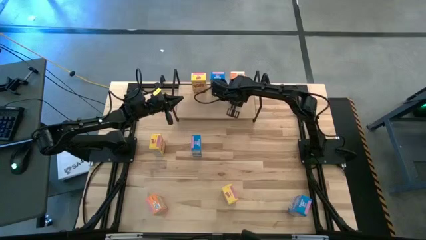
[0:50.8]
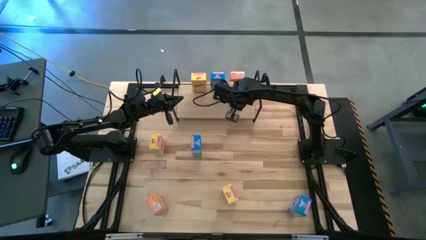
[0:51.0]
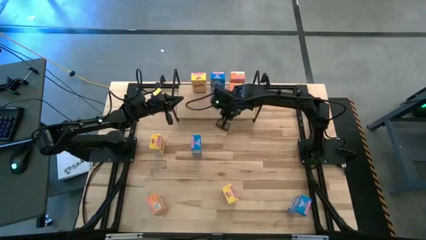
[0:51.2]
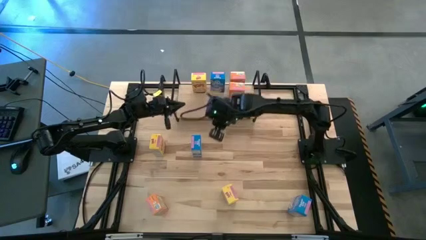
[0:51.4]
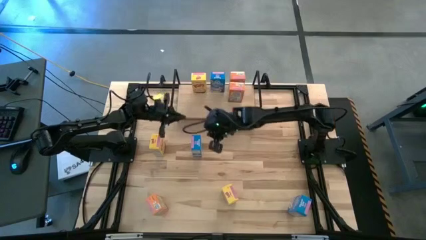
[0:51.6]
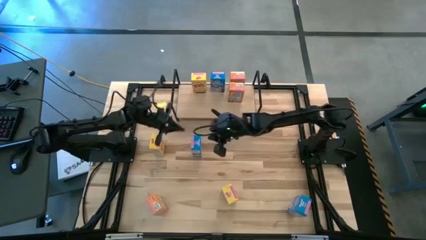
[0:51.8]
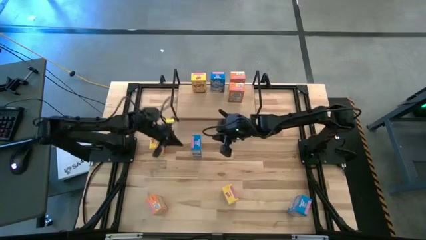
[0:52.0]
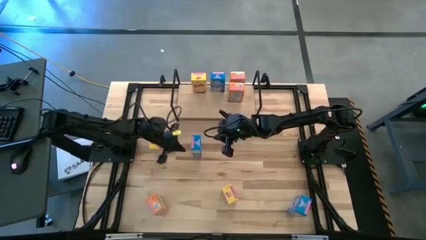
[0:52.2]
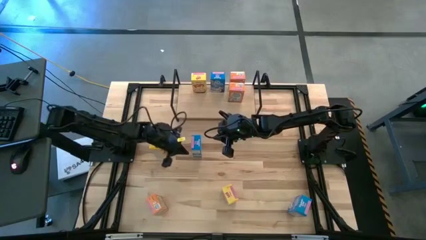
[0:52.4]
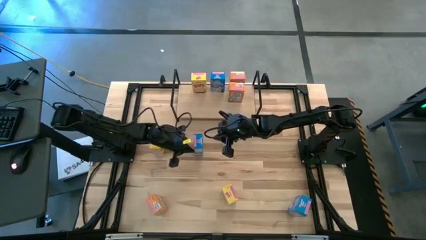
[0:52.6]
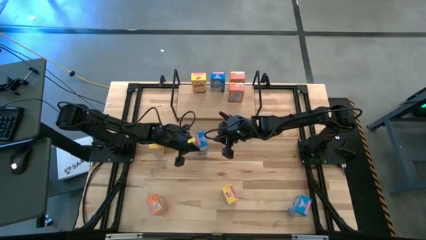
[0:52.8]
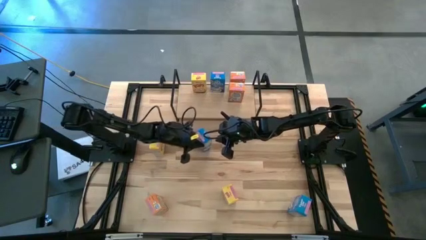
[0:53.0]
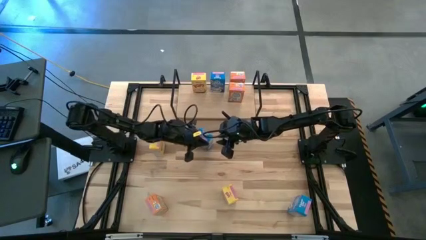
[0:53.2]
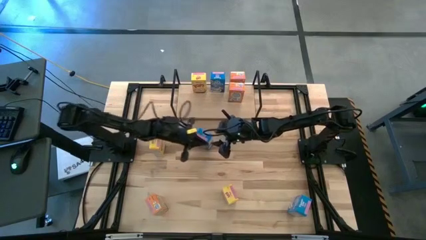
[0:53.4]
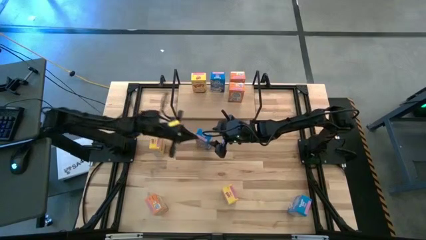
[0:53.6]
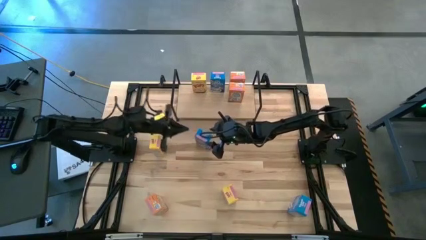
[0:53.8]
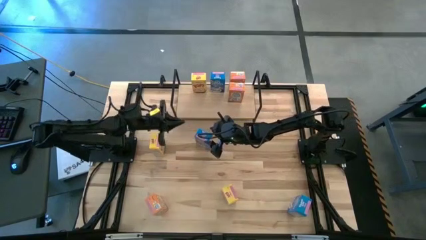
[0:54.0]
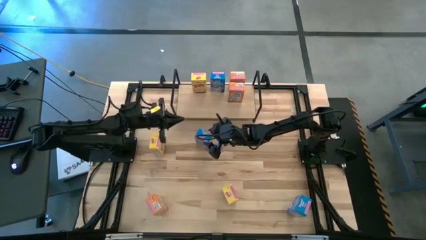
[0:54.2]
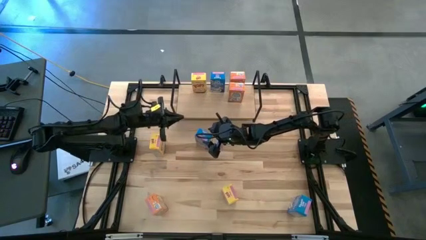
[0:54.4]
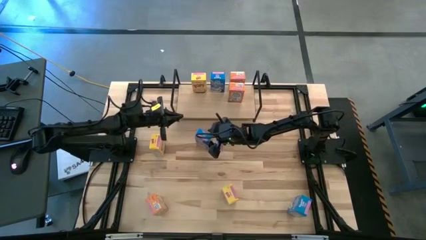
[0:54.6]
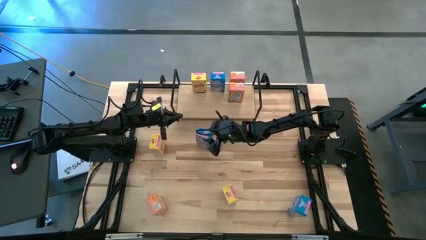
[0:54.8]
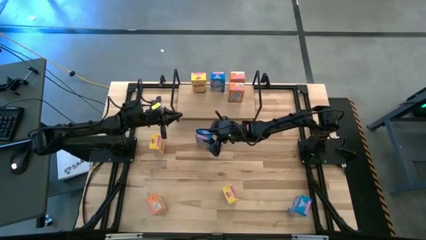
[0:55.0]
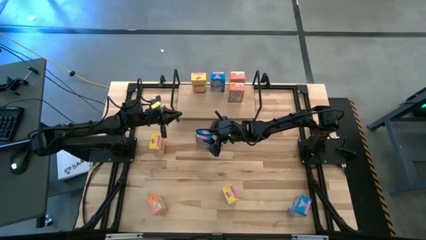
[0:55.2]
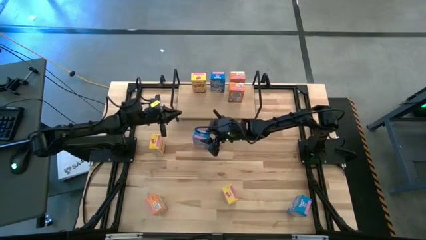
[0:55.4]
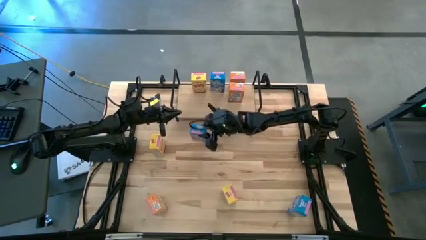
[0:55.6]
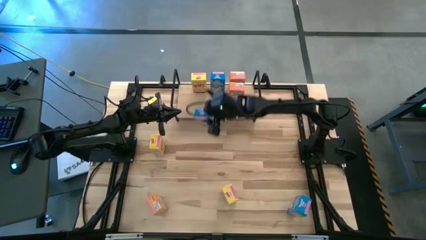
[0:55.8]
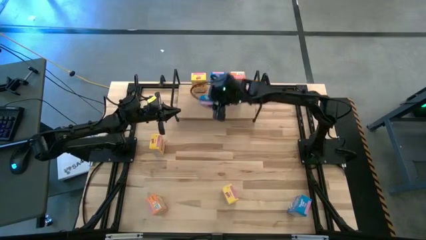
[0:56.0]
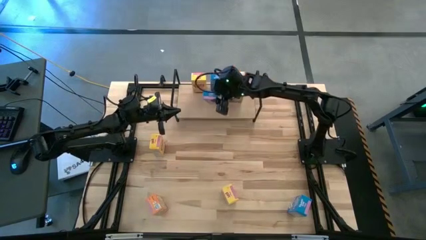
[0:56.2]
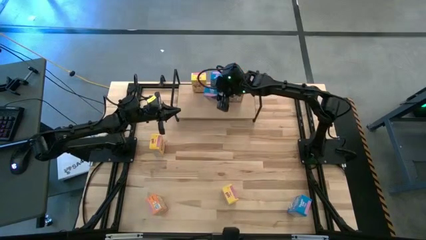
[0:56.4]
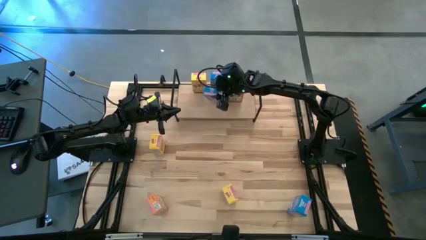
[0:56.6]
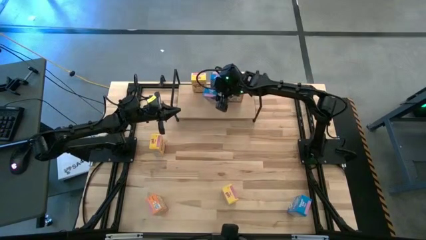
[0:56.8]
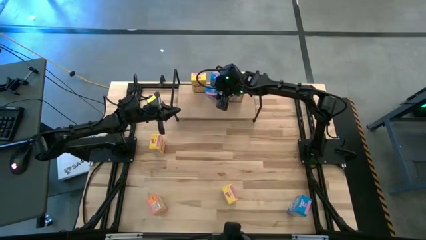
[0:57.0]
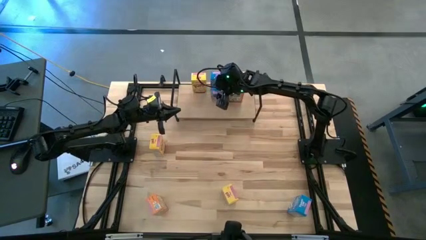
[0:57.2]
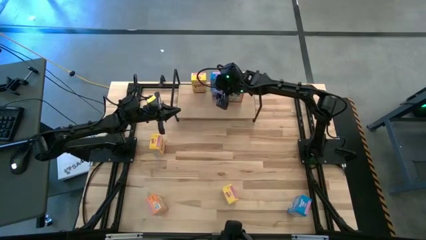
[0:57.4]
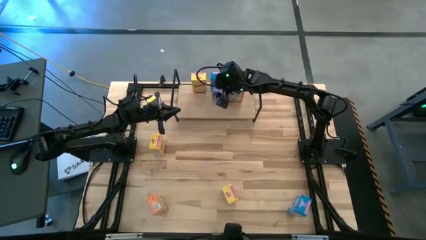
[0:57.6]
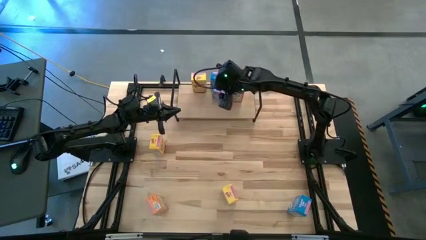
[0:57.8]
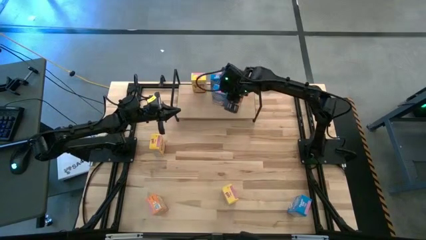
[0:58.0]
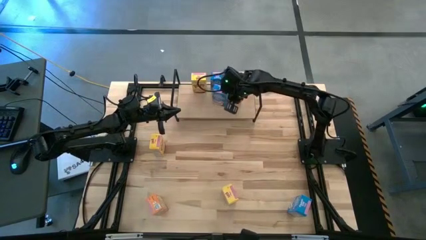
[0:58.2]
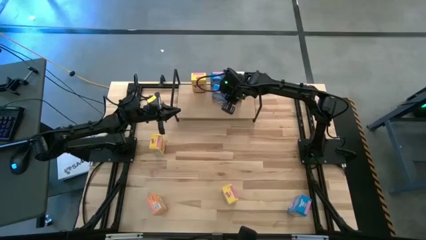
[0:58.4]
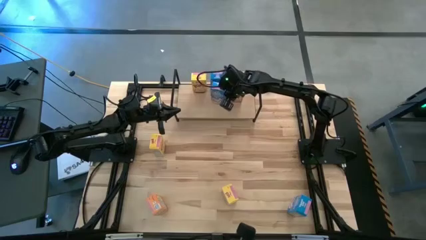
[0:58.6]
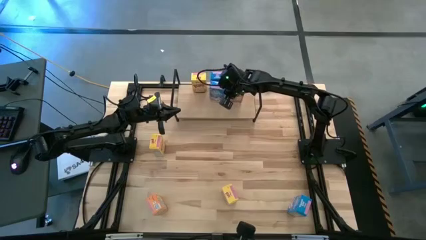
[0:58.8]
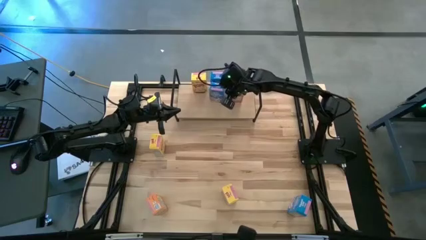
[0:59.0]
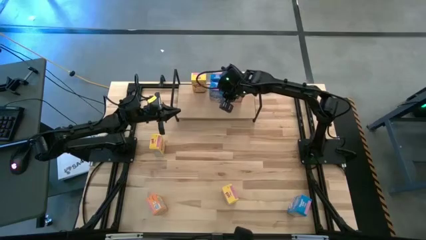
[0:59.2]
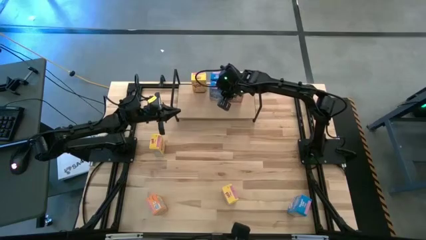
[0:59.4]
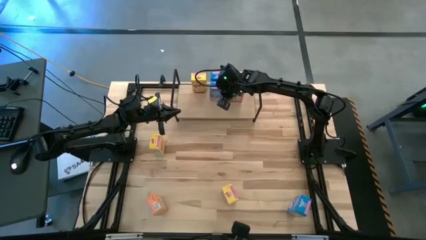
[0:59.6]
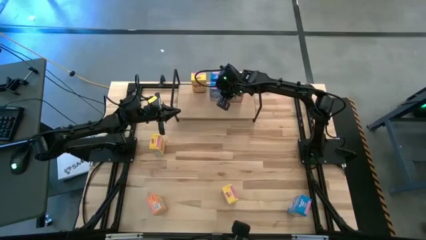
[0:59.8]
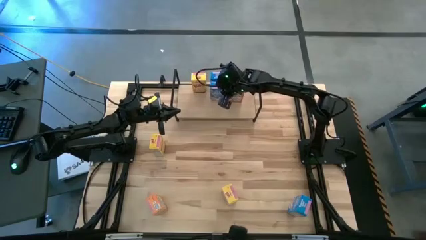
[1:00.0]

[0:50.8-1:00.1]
Task: Stack cereal on shelf
Put the top blue cereal box on the shelf aligned with the other blue cereal box
